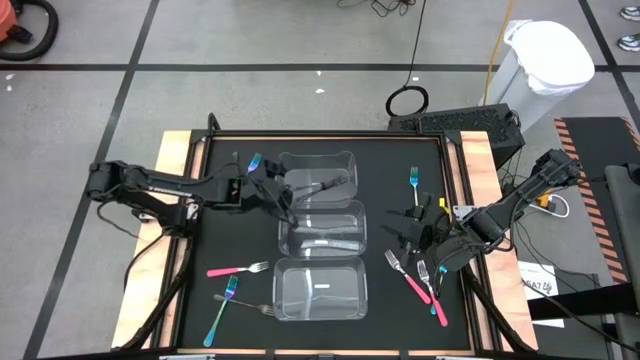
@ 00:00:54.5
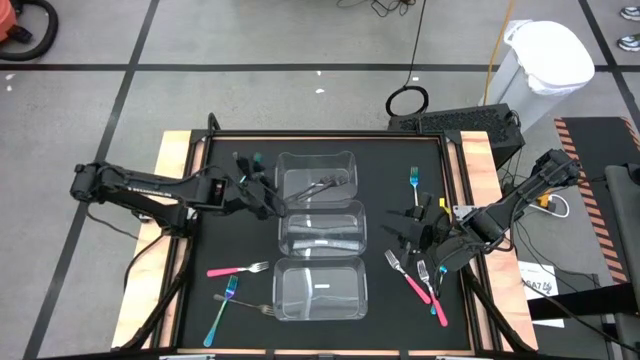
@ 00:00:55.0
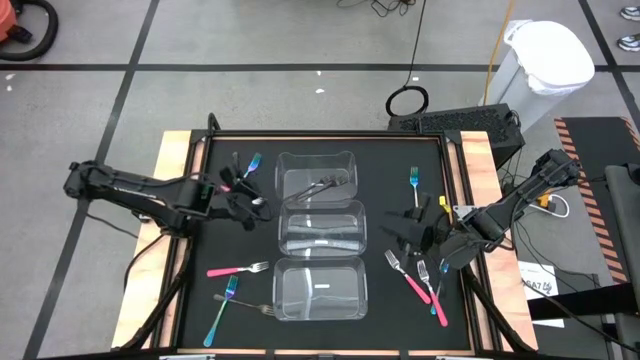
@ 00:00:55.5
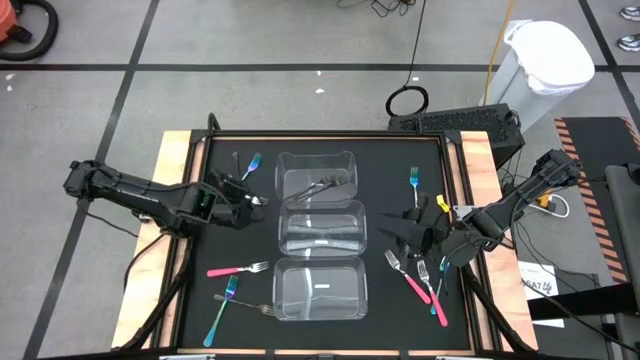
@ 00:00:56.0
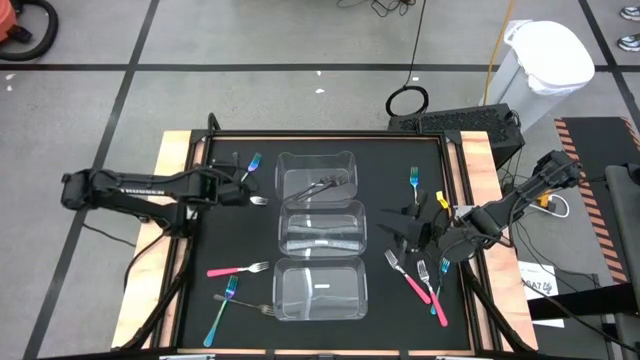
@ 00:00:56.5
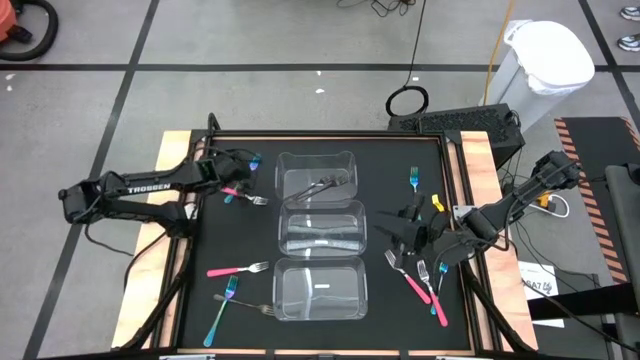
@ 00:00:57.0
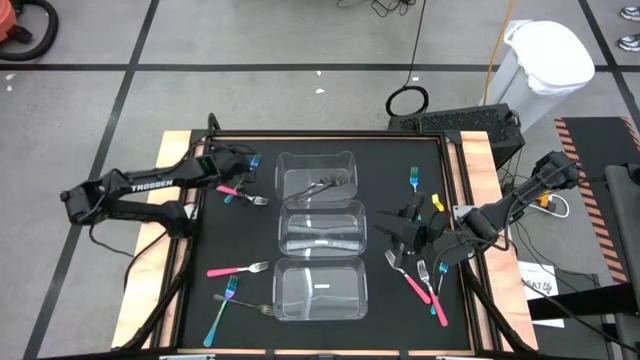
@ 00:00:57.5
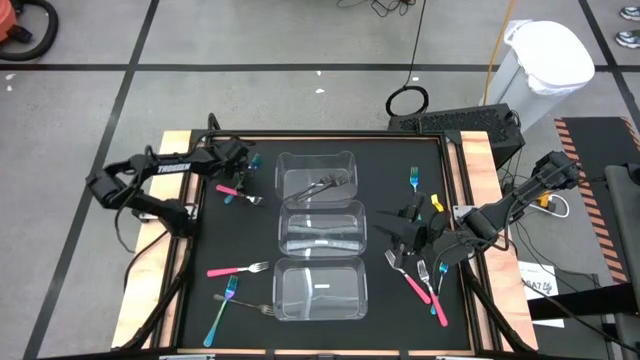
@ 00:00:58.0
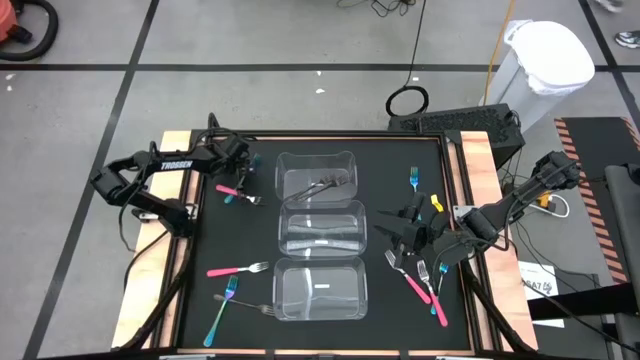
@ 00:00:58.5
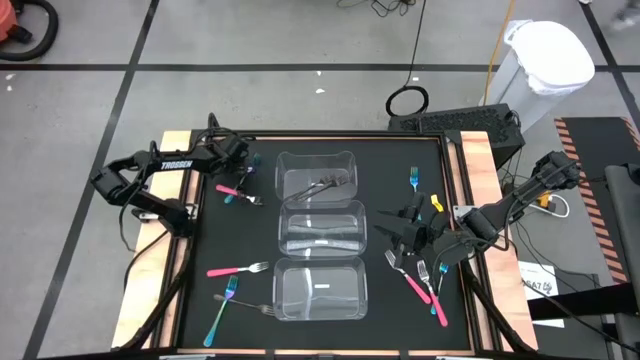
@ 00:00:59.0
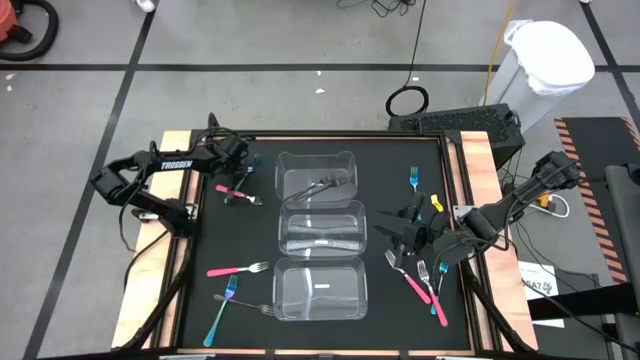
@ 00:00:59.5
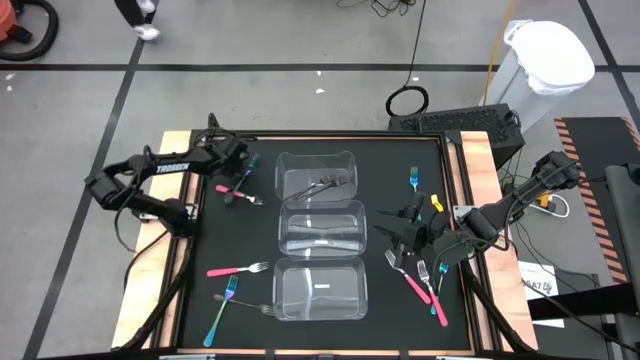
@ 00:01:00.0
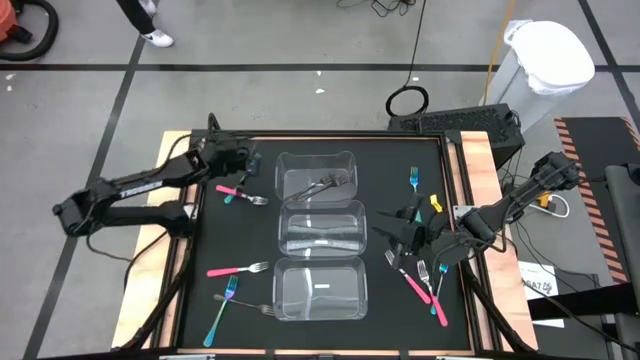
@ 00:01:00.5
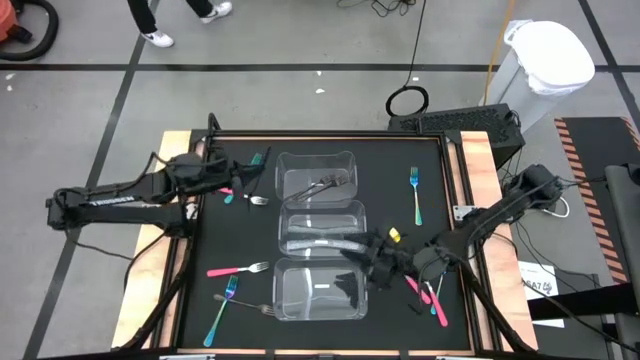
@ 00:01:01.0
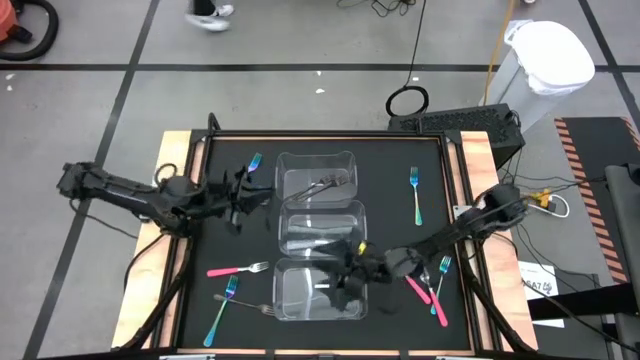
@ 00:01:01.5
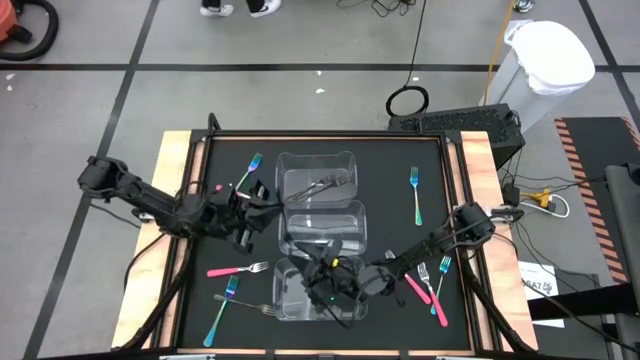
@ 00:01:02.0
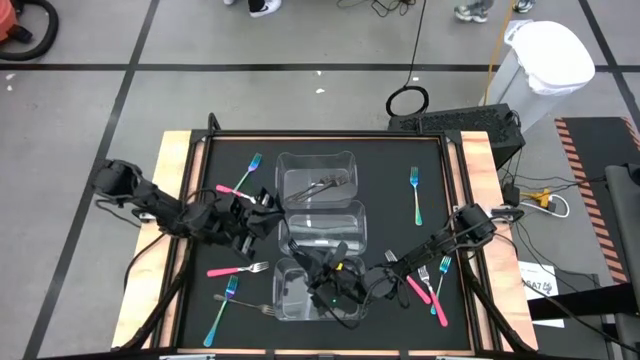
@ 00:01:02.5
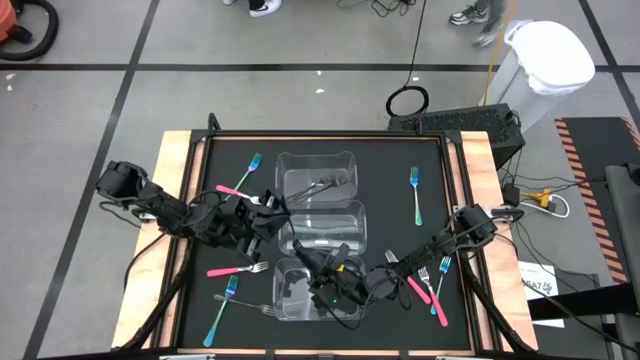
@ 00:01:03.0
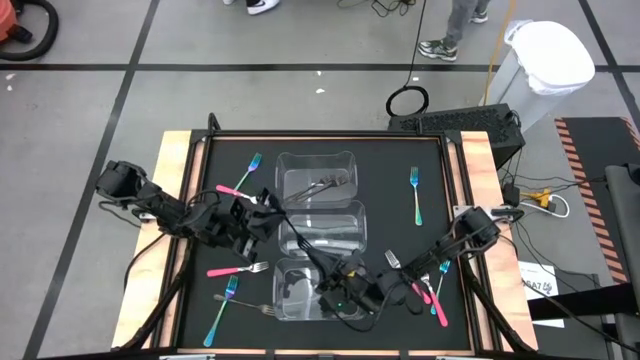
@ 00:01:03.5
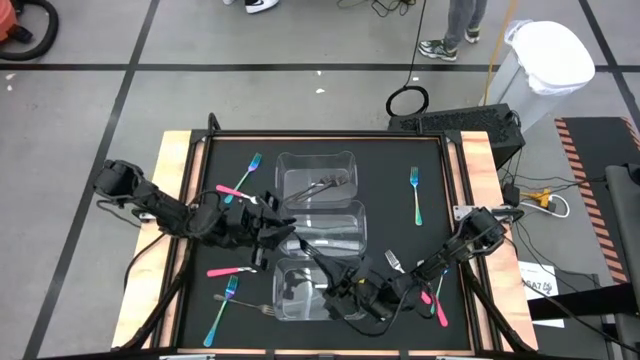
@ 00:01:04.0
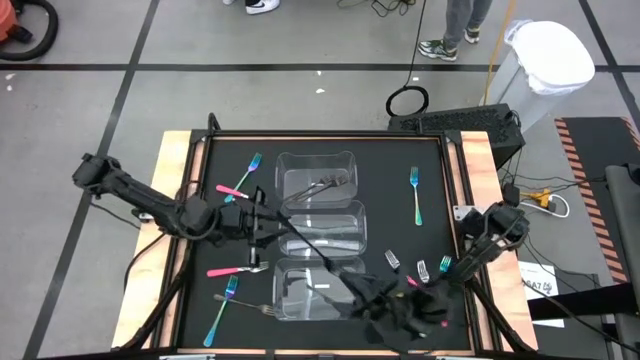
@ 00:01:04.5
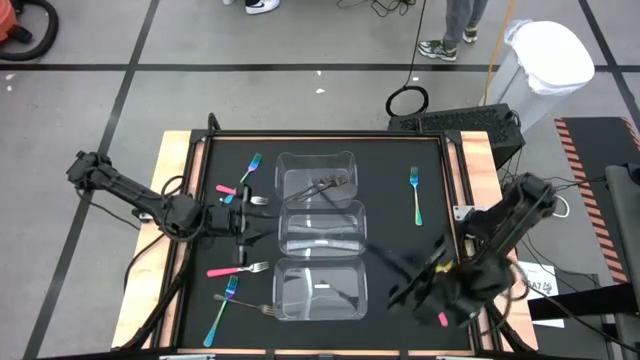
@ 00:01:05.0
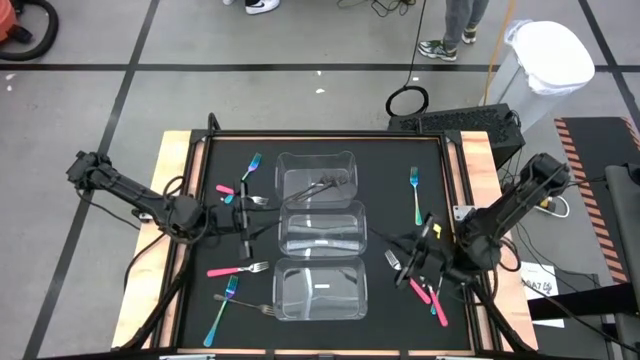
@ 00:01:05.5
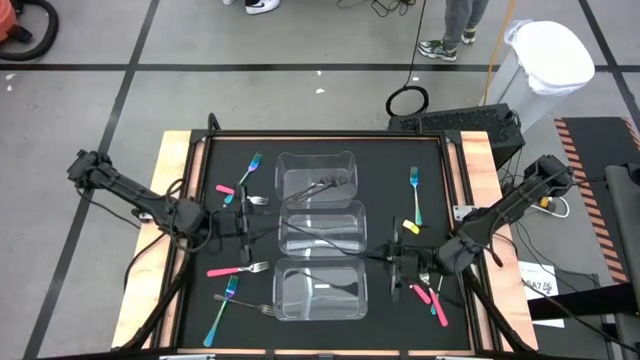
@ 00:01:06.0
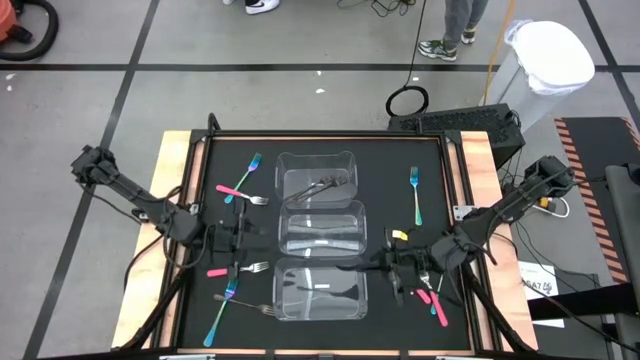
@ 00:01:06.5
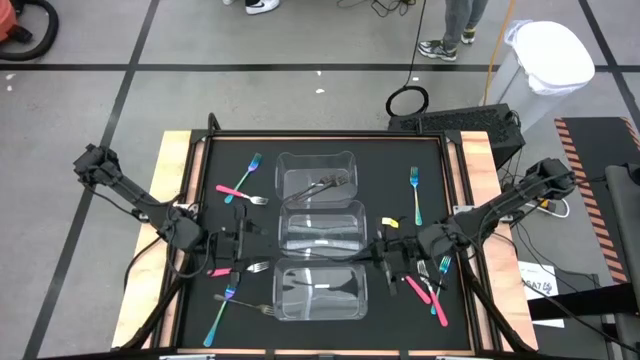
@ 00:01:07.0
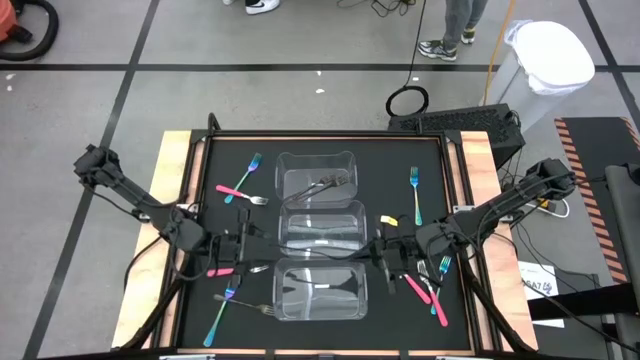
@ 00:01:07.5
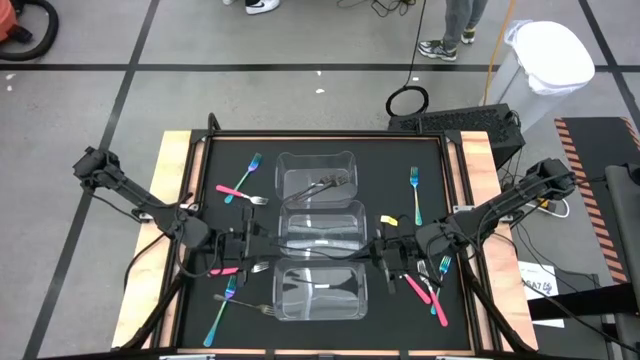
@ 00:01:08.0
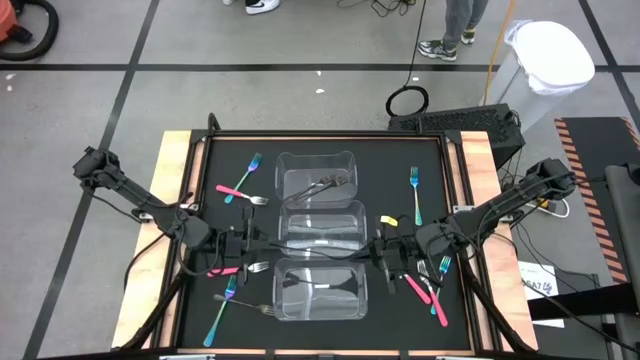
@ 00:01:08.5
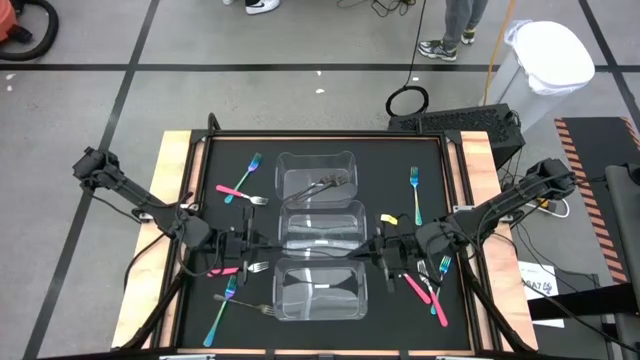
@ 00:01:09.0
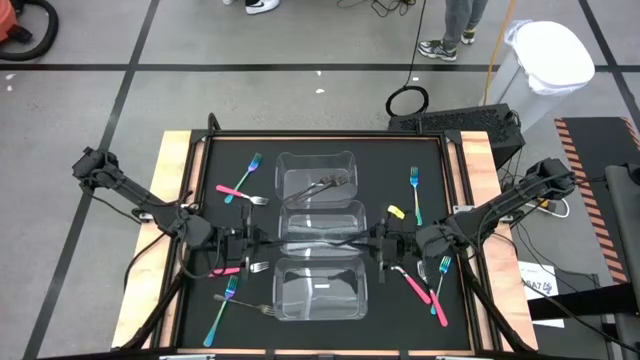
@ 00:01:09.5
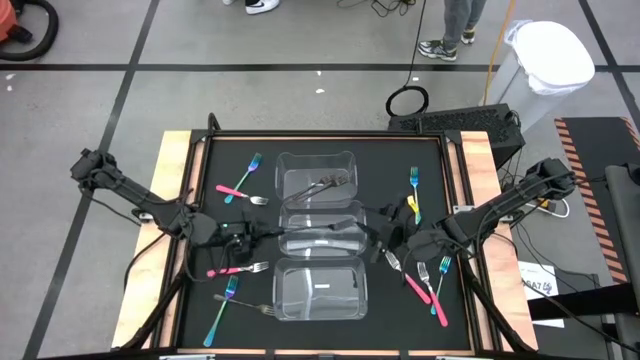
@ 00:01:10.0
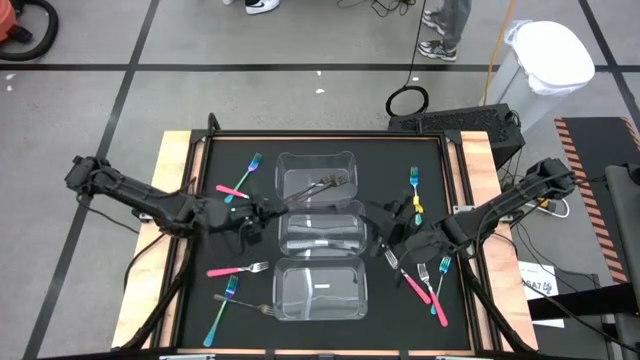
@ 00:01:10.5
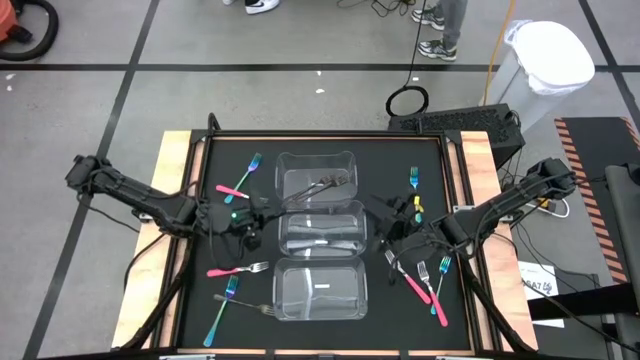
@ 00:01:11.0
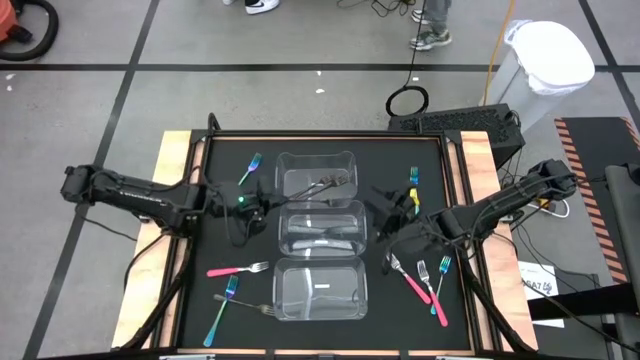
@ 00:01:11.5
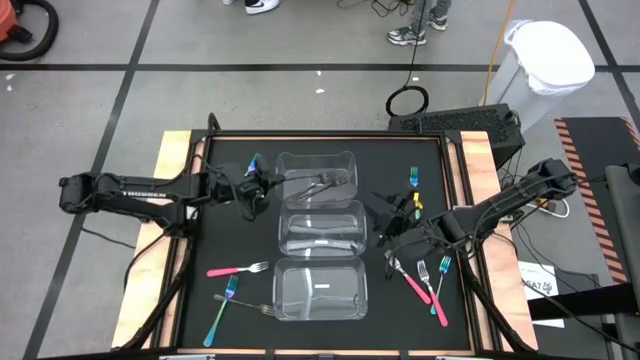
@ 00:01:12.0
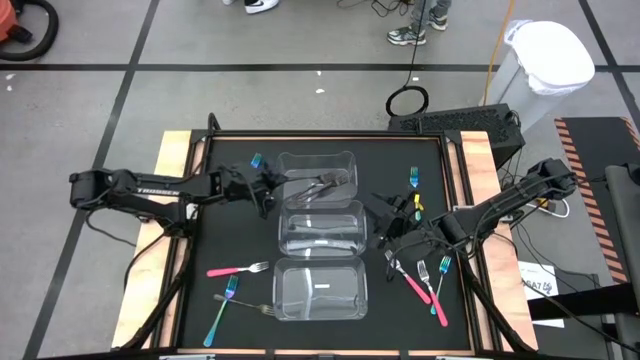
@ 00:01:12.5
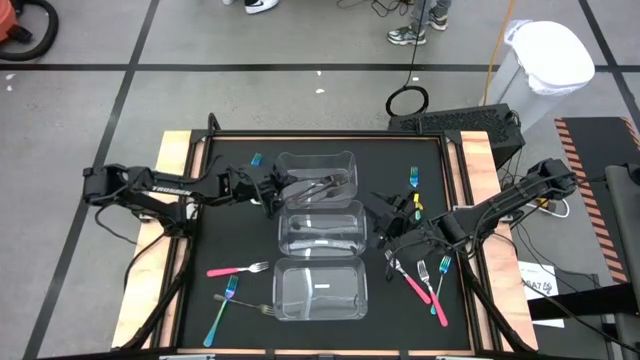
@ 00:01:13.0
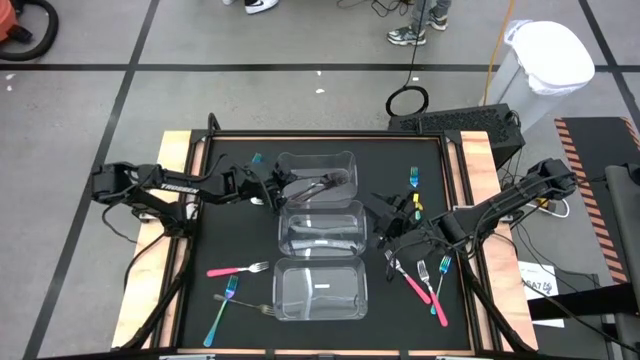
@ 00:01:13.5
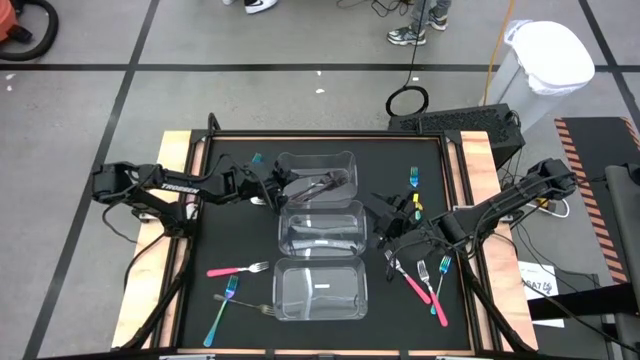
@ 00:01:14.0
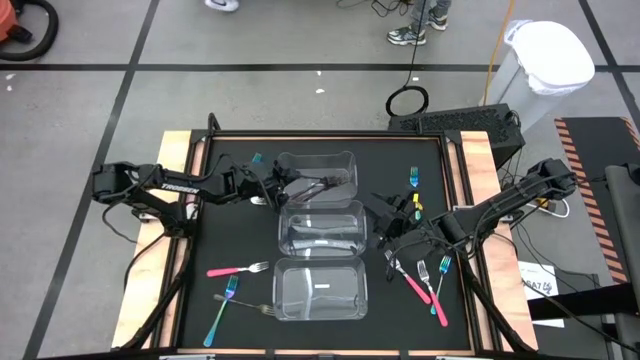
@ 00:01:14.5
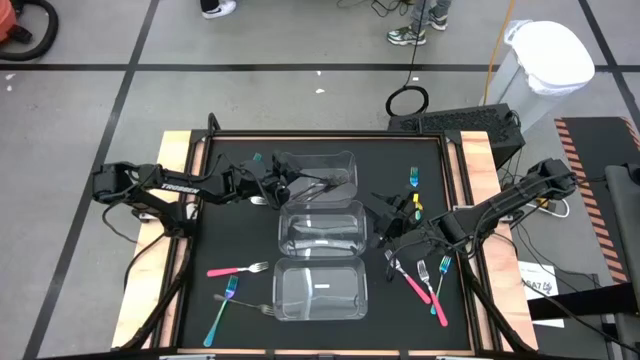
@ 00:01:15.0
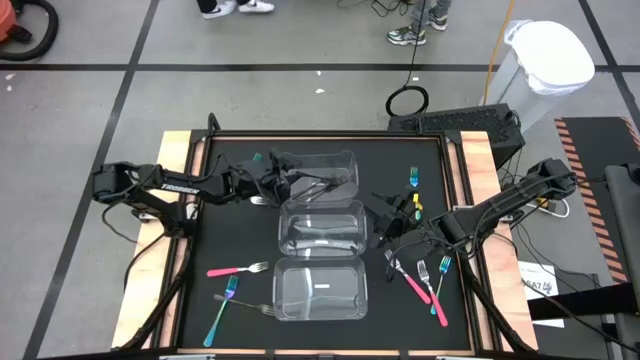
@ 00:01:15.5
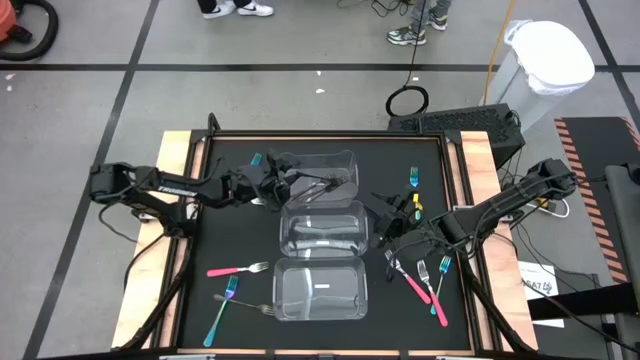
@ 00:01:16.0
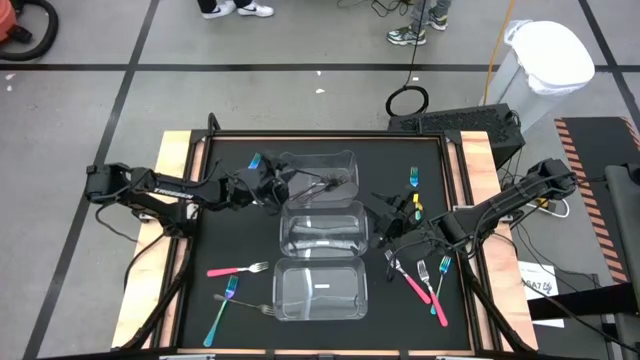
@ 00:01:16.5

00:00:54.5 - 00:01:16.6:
Task: Sort silverware by color (type)
Put the top black fork into the top transparent bin
